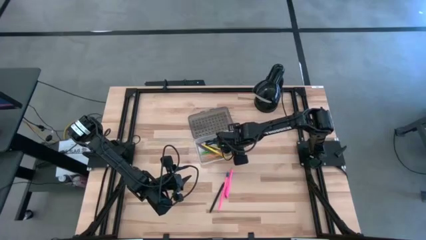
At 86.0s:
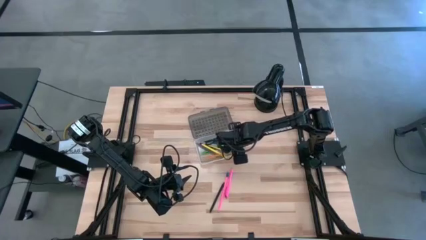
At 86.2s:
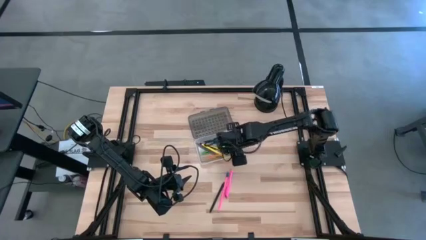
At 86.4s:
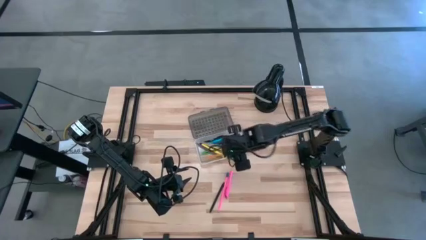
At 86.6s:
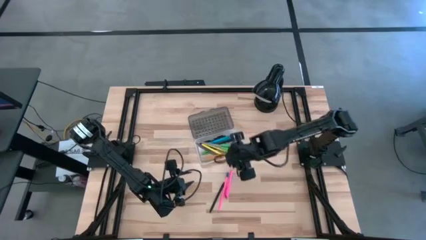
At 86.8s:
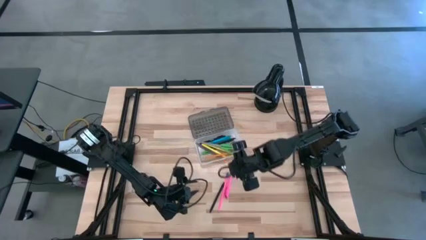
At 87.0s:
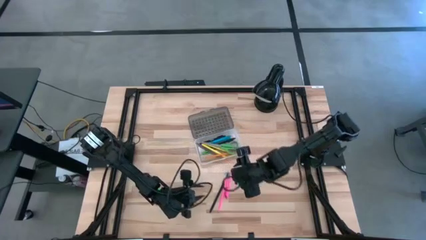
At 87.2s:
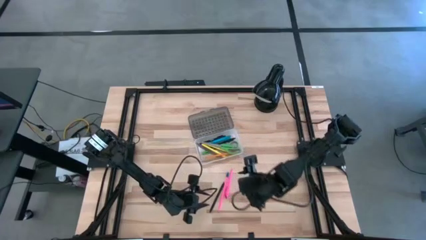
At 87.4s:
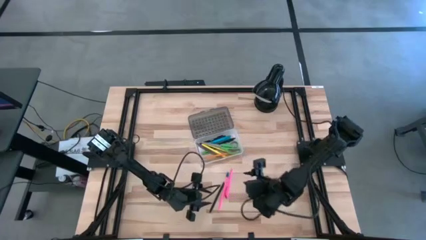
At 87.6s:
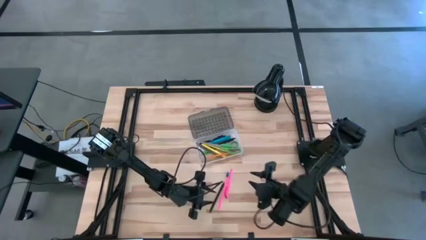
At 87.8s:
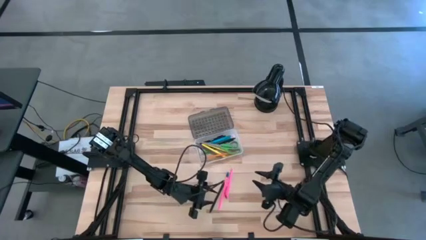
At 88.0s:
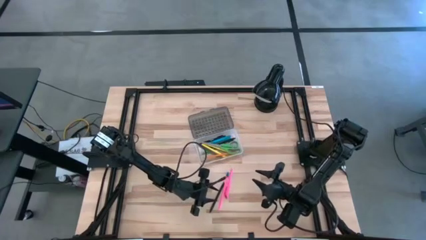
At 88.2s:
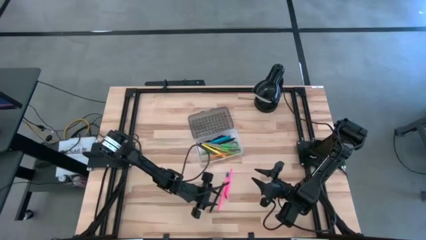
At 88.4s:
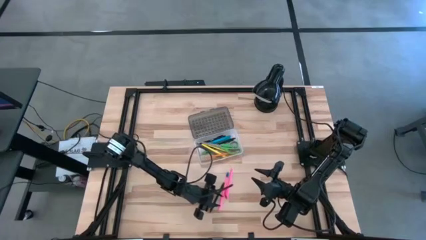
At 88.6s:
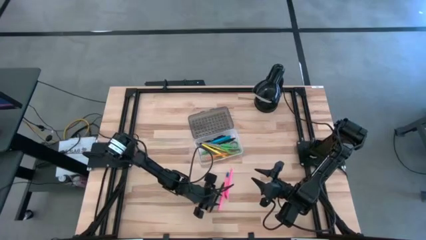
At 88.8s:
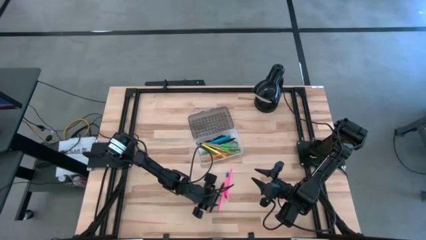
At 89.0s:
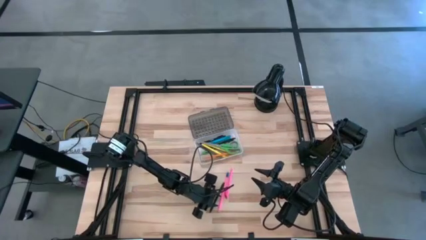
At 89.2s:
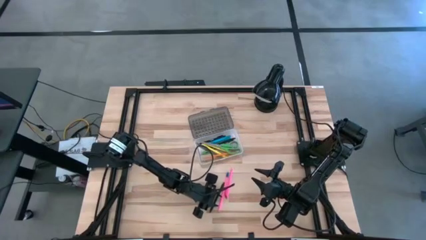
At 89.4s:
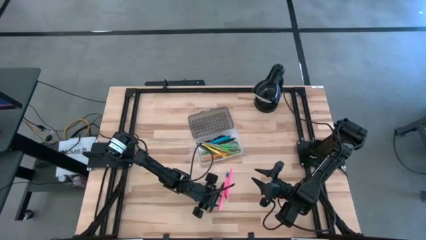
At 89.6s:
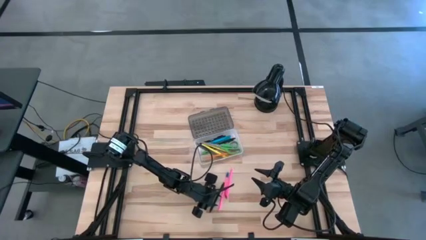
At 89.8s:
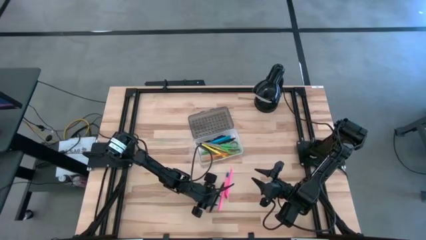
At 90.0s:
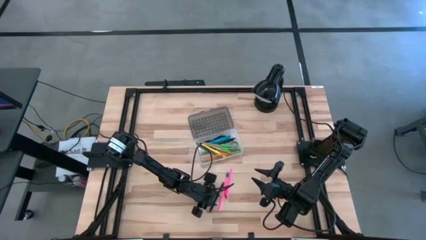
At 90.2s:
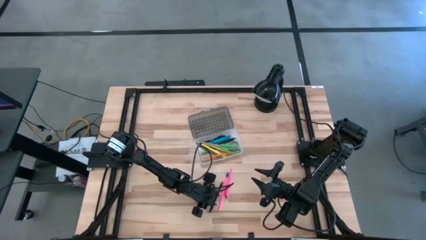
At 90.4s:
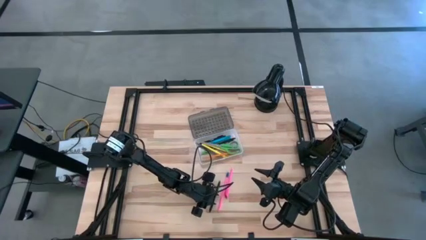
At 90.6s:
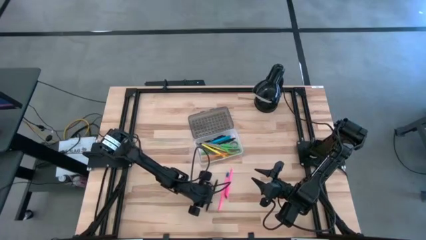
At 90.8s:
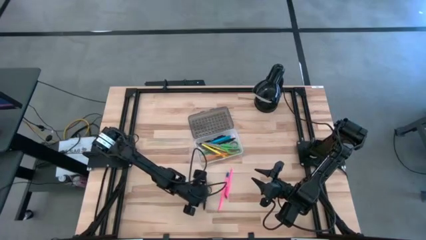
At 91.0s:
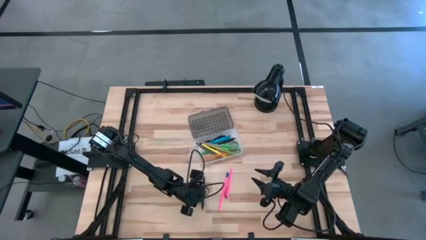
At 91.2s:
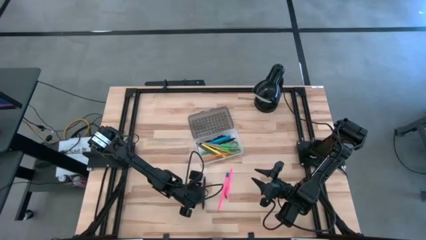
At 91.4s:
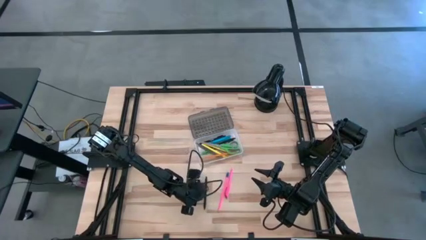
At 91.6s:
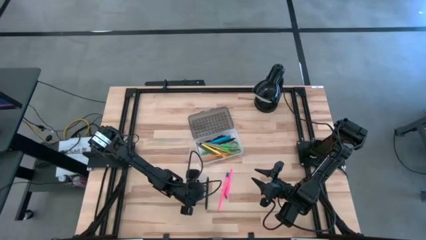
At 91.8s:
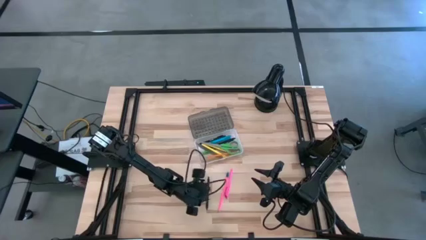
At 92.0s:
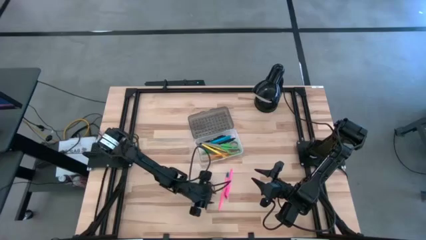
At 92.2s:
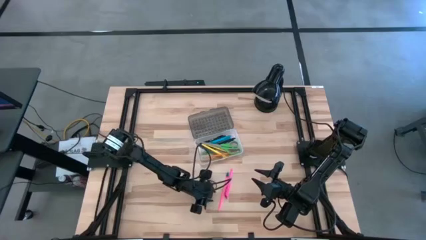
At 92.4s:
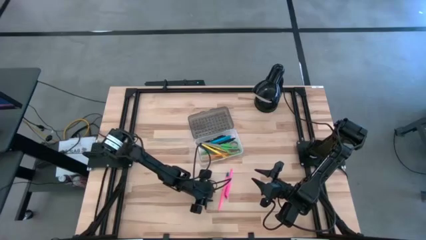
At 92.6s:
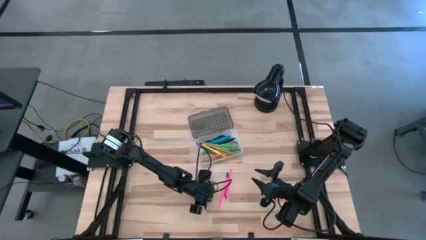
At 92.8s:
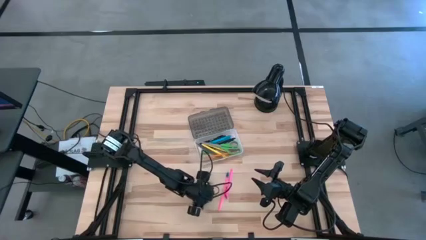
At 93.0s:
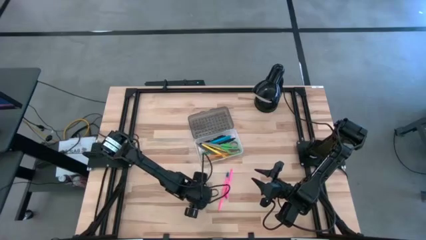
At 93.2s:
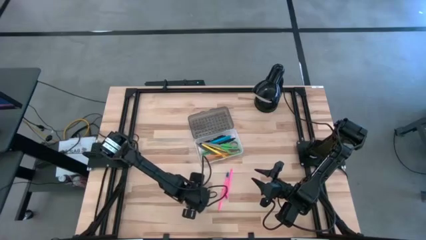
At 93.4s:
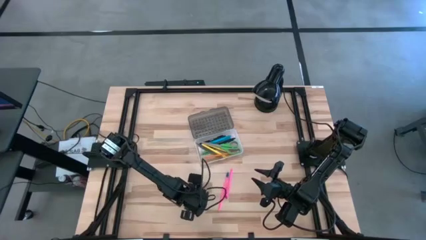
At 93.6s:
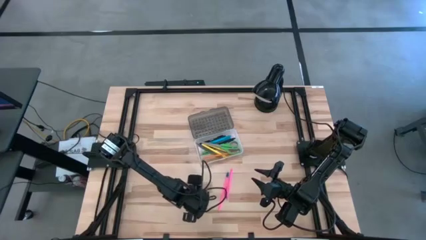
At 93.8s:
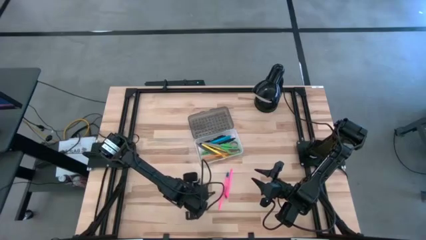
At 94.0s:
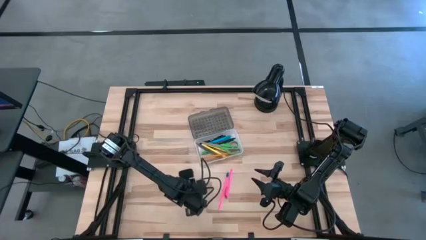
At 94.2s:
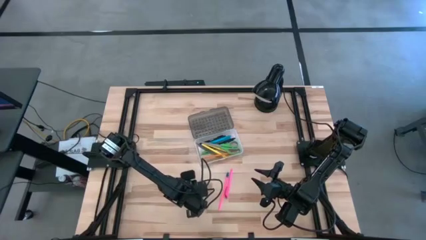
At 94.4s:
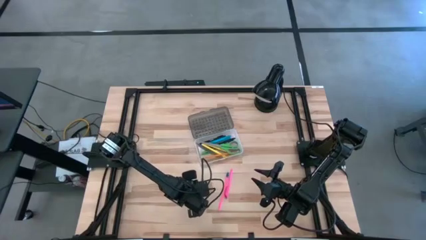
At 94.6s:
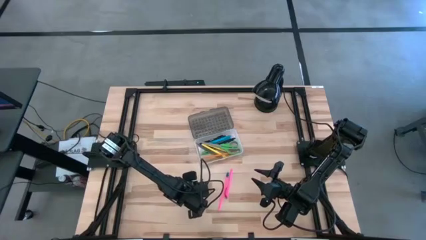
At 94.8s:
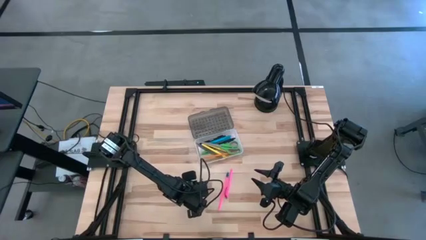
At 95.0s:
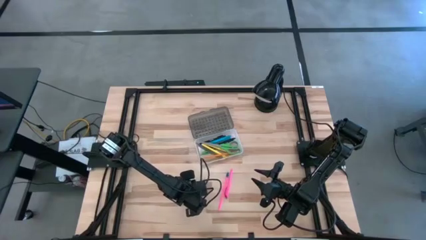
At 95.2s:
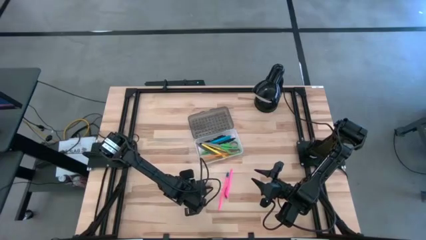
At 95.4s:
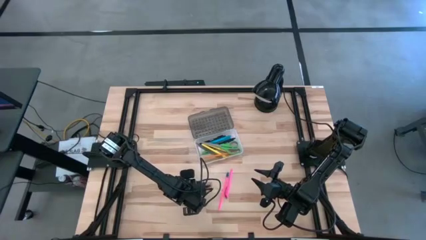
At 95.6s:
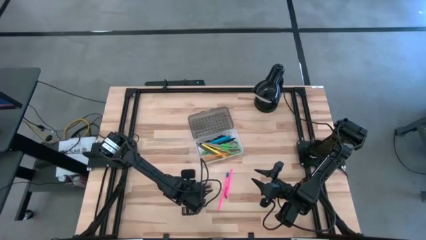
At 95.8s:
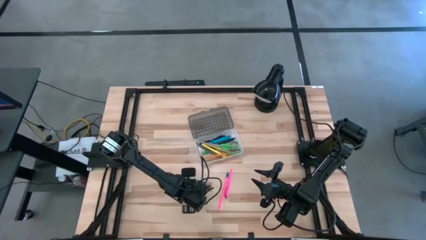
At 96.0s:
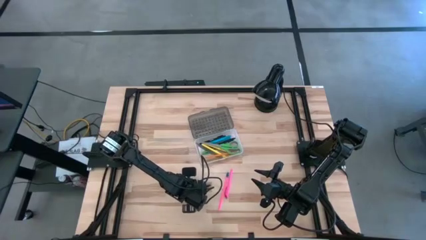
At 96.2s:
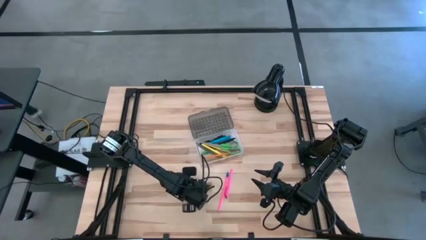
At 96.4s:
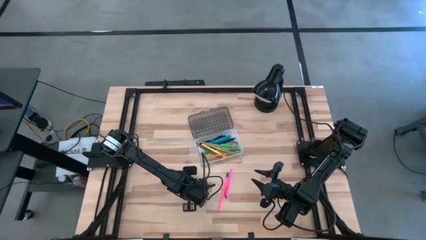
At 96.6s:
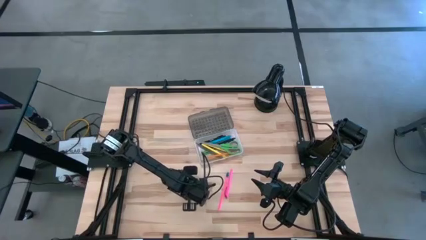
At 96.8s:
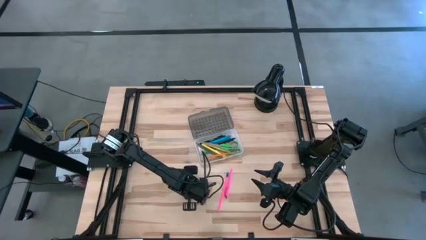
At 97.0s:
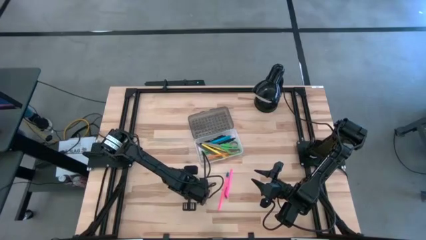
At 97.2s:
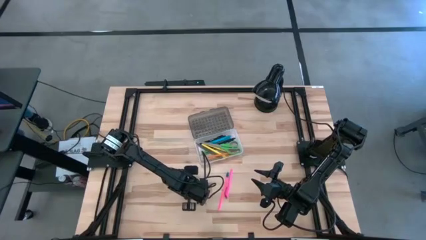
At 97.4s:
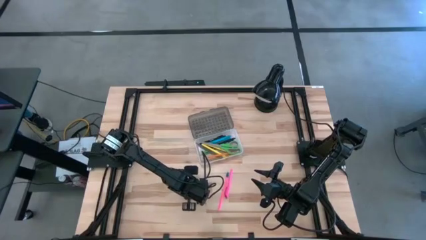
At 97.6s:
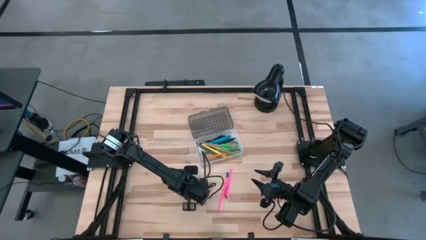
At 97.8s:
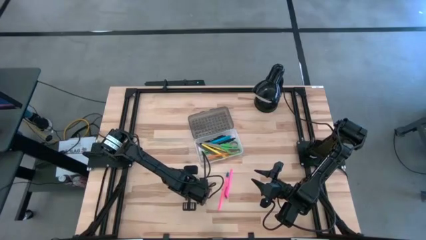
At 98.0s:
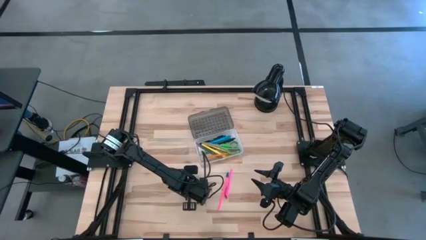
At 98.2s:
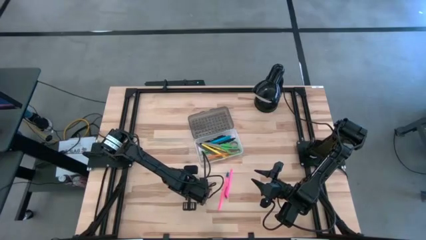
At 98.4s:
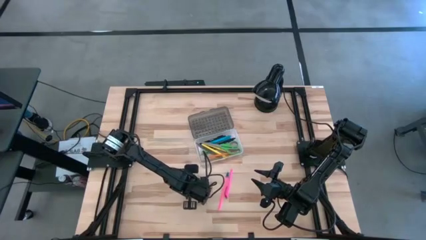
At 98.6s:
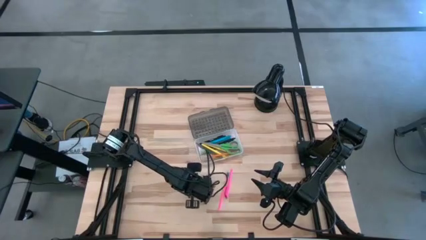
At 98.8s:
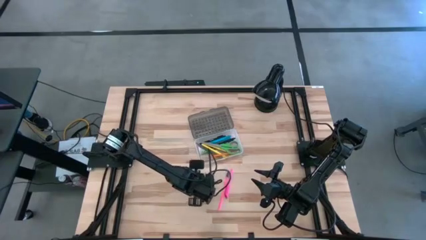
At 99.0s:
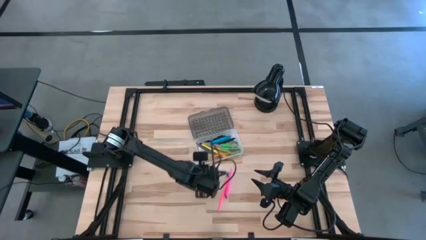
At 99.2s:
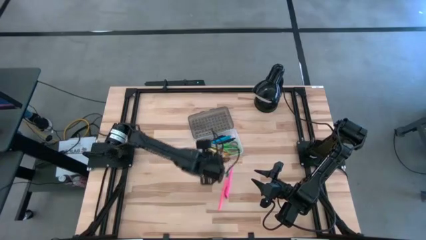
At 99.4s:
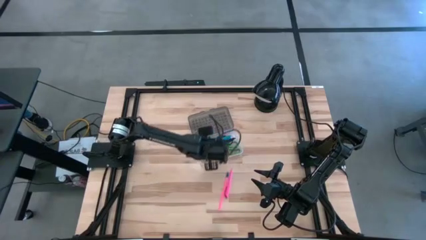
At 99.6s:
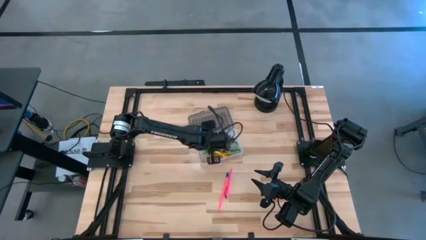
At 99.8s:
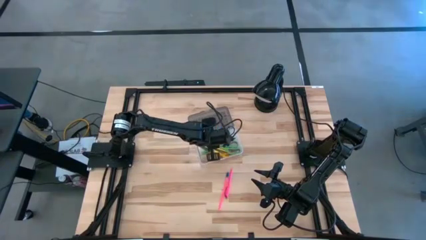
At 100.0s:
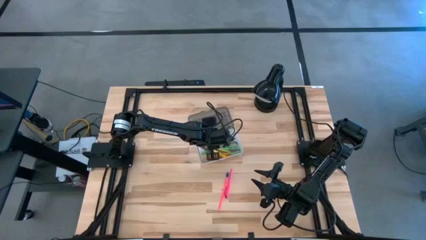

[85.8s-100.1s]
Task: Pick & place school supplies into a supply box
Put the black pen into the transparent supply box

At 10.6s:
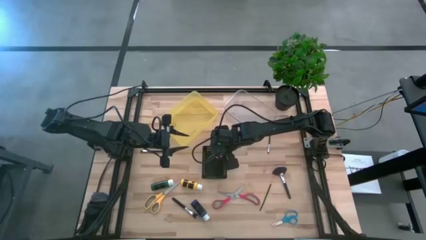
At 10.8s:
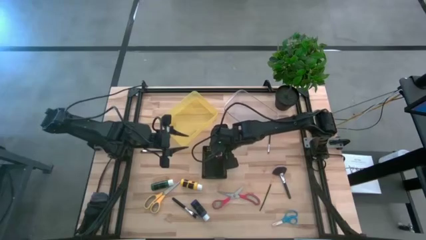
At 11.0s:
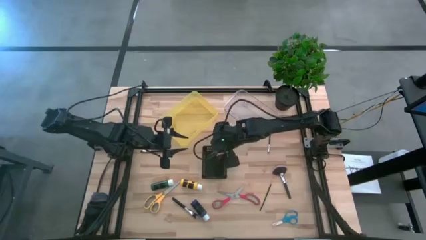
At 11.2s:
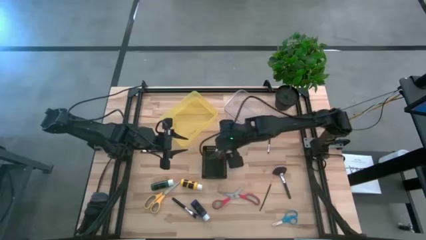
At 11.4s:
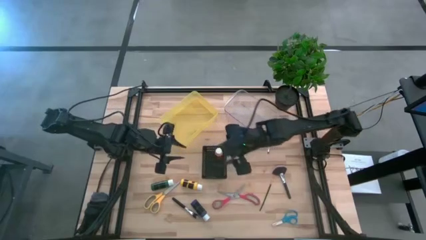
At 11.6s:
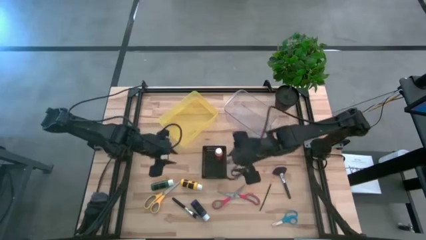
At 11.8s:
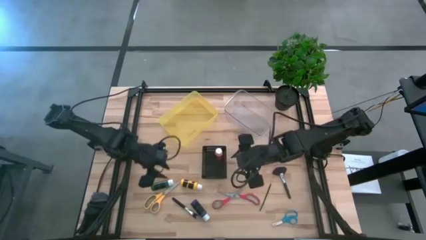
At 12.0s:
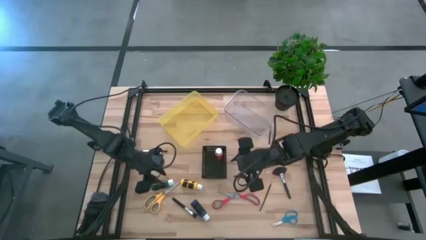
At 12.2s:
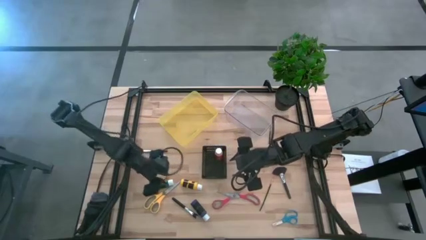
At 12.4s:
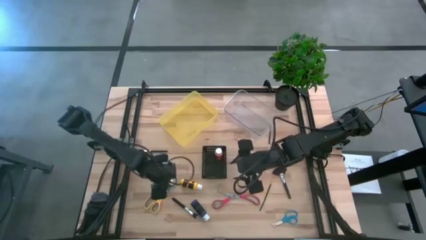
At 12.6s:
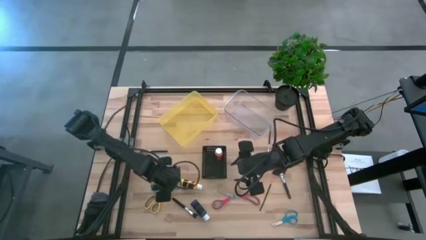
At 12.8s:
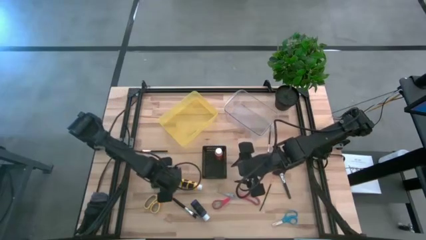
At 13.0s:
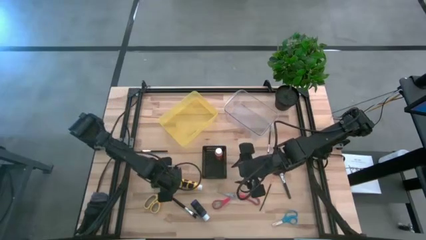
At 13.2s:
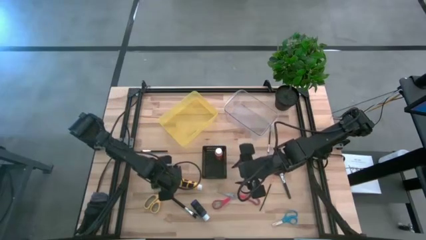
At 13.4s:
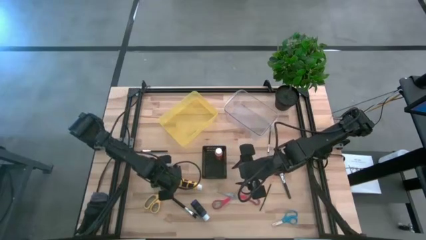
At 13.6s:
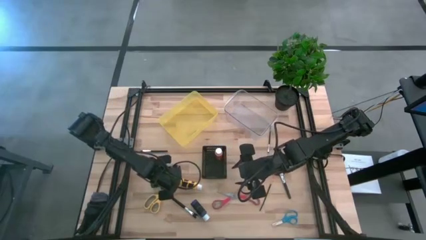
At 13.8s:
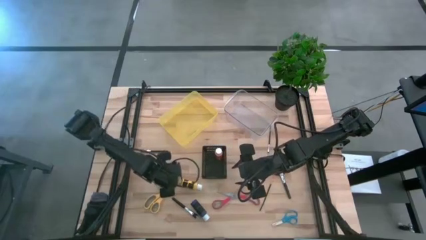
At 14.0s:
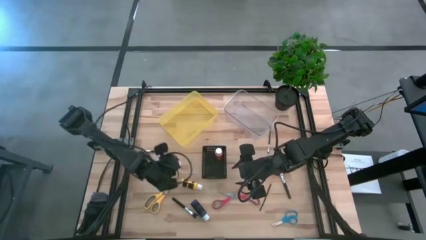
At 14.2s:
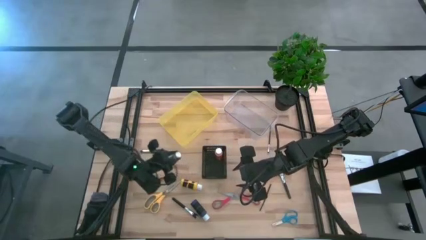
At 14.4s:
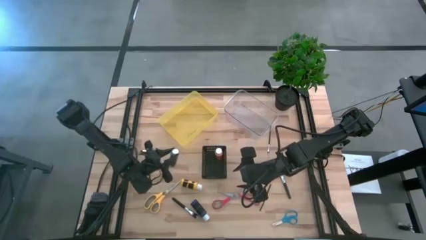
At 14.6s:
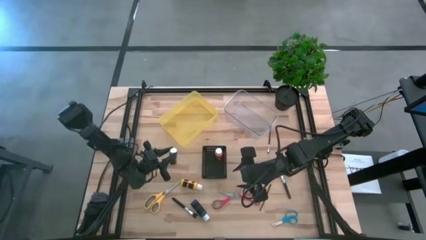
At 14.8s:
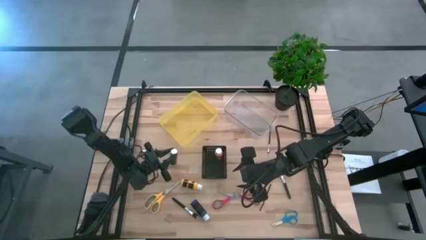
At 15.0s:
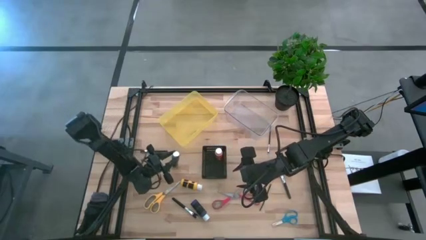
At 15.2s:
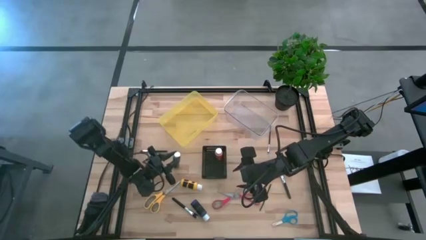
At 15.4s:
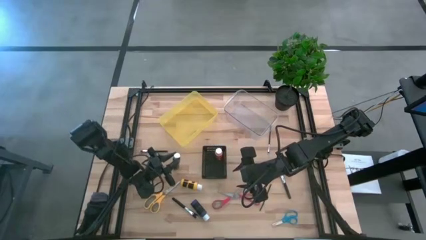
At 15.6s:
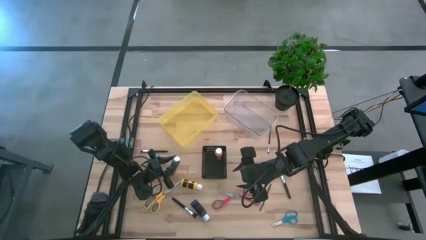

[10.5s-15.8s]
Task: Pick & Place Paint Supplies
Put the green paint bottle into the black bin
